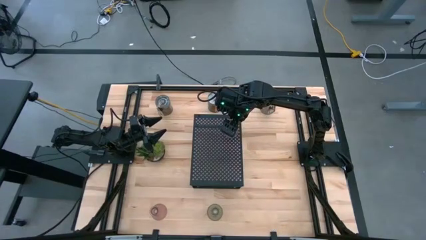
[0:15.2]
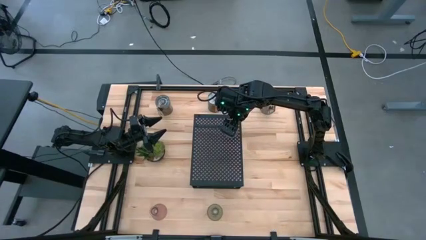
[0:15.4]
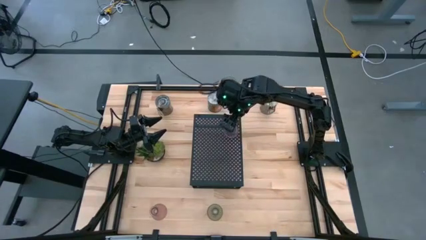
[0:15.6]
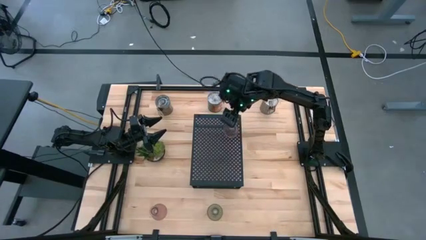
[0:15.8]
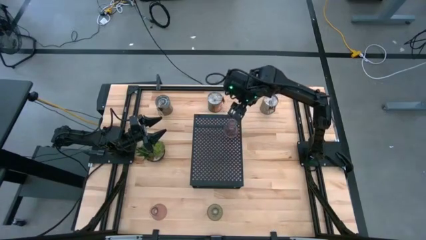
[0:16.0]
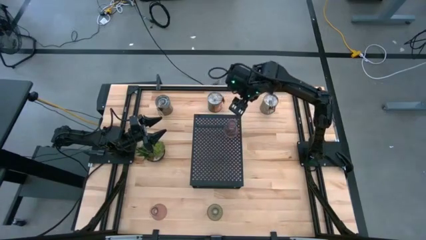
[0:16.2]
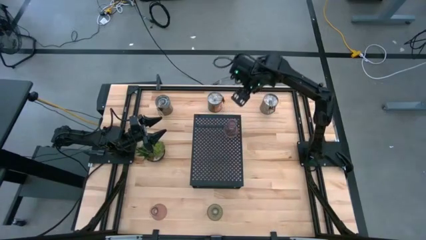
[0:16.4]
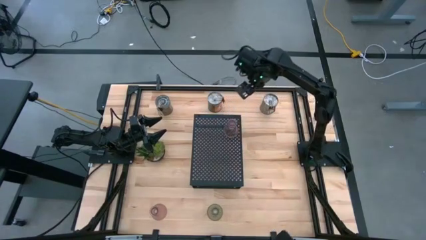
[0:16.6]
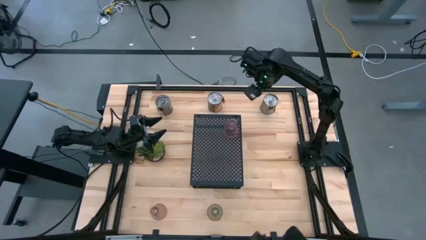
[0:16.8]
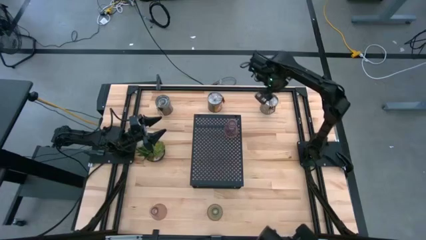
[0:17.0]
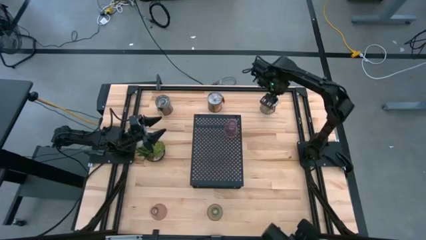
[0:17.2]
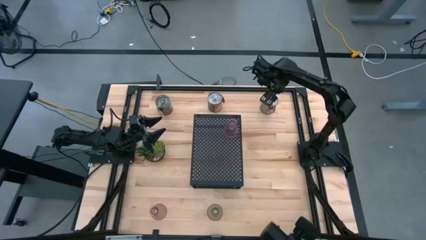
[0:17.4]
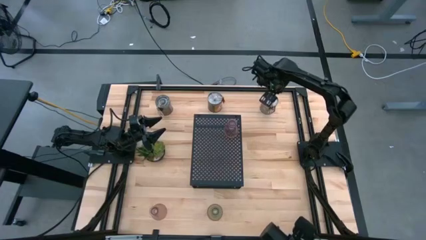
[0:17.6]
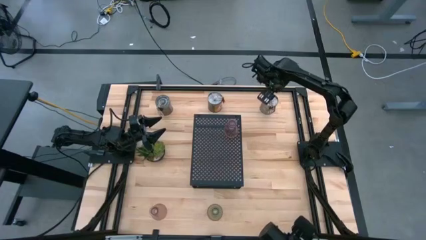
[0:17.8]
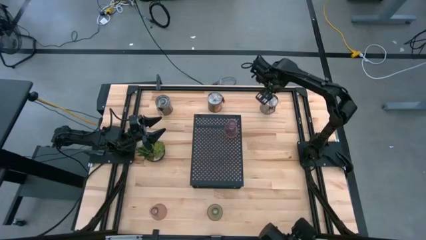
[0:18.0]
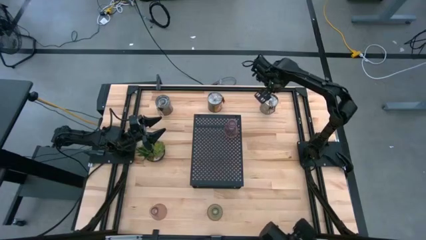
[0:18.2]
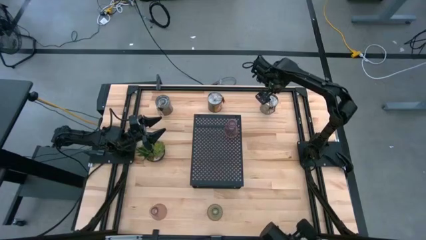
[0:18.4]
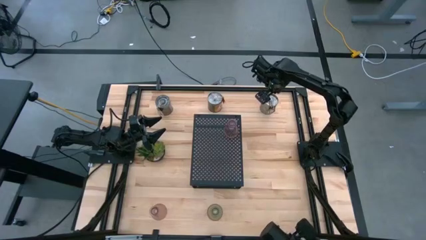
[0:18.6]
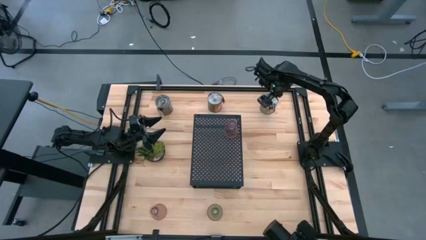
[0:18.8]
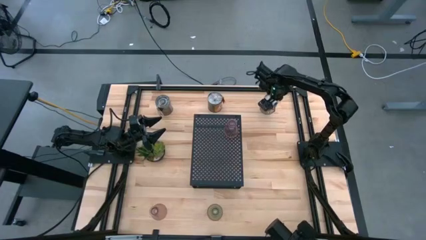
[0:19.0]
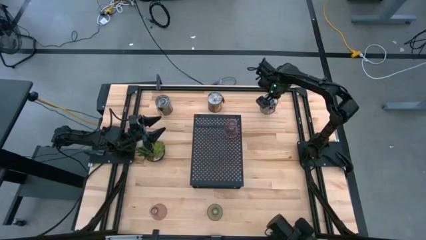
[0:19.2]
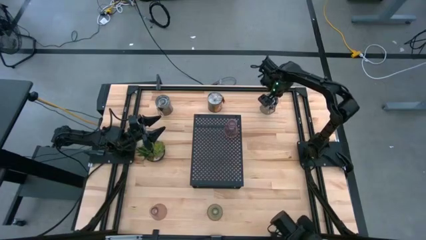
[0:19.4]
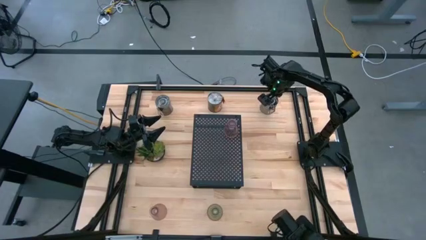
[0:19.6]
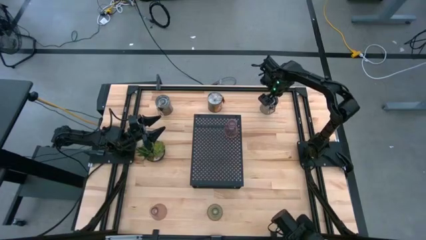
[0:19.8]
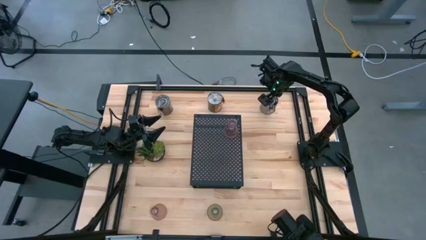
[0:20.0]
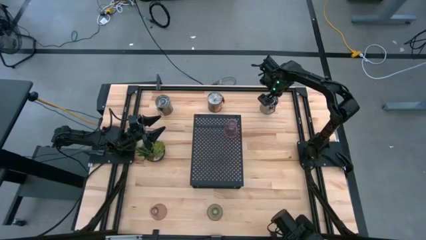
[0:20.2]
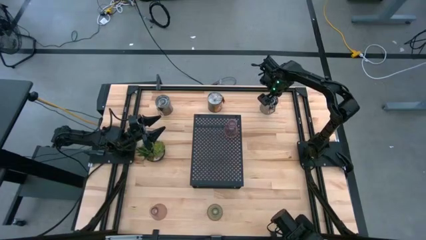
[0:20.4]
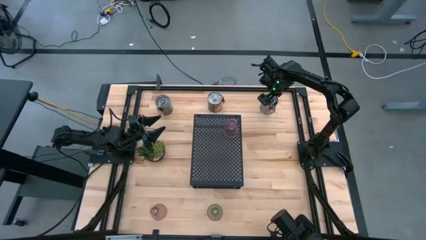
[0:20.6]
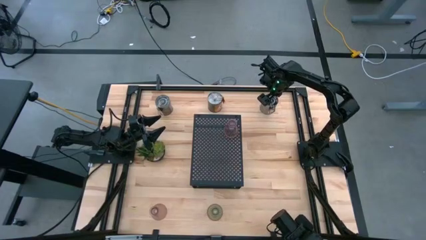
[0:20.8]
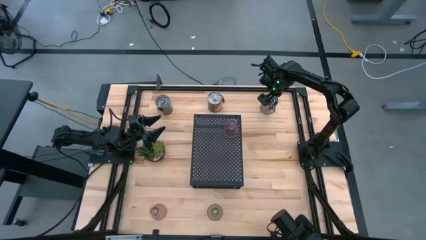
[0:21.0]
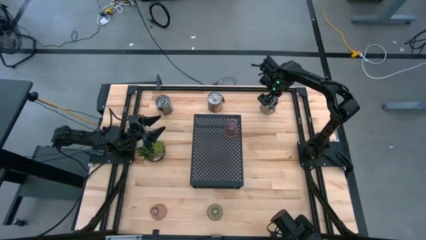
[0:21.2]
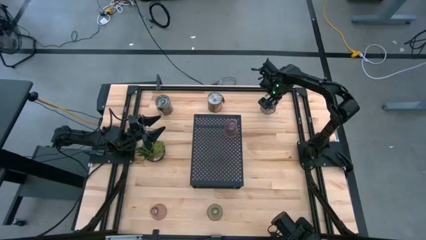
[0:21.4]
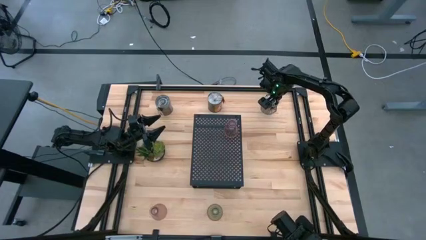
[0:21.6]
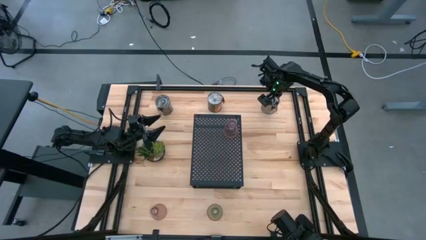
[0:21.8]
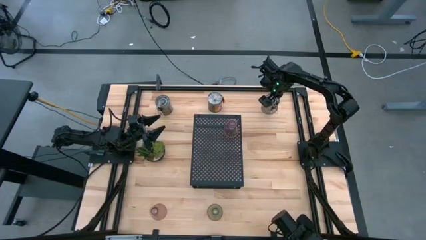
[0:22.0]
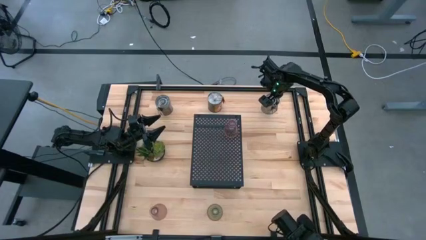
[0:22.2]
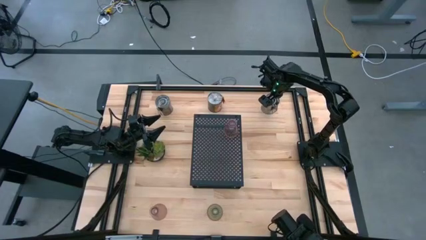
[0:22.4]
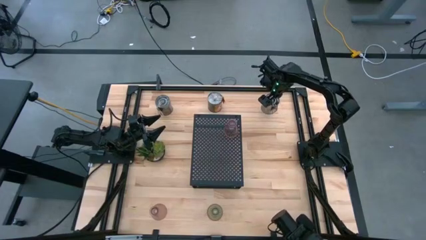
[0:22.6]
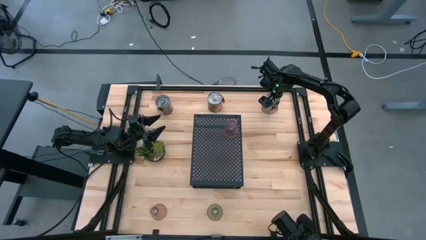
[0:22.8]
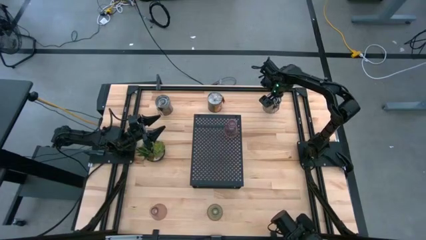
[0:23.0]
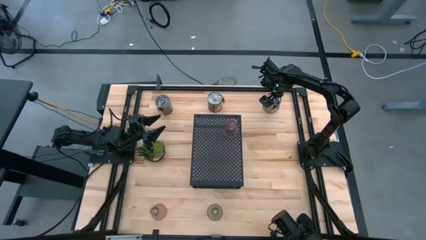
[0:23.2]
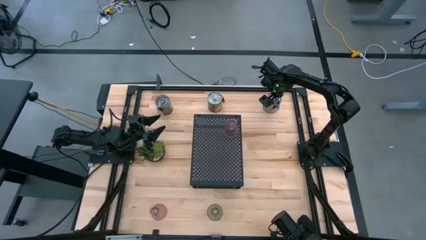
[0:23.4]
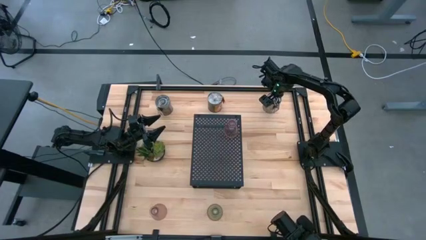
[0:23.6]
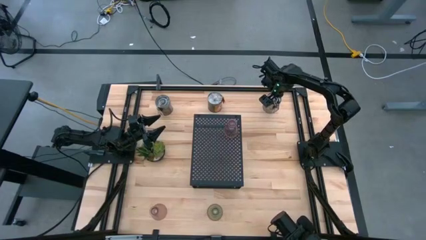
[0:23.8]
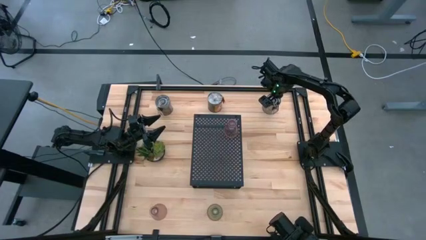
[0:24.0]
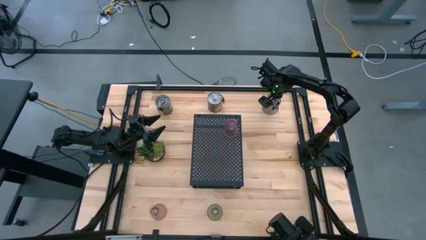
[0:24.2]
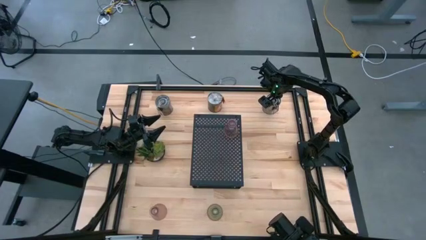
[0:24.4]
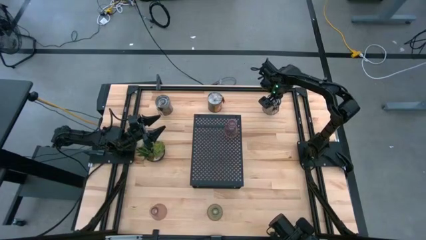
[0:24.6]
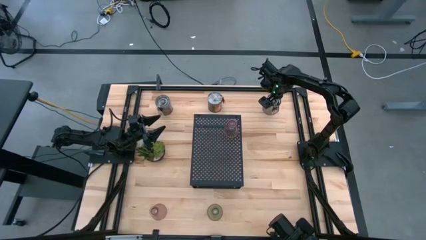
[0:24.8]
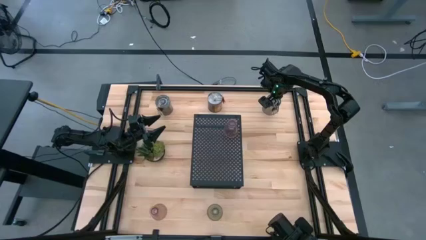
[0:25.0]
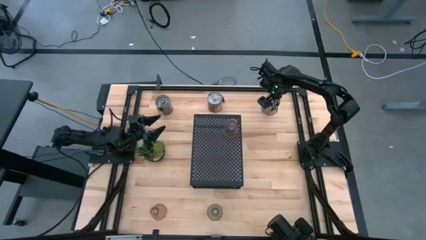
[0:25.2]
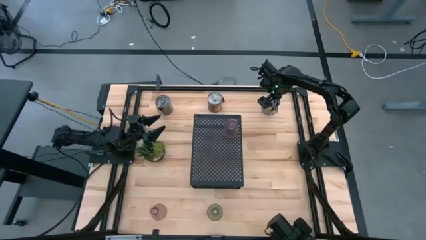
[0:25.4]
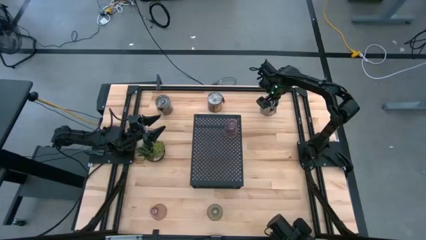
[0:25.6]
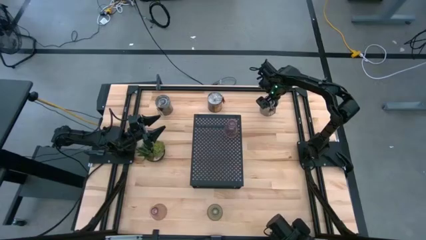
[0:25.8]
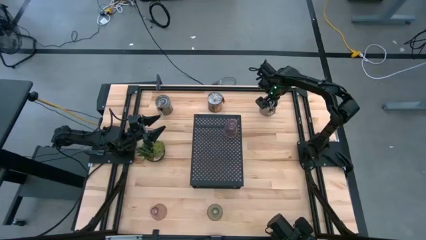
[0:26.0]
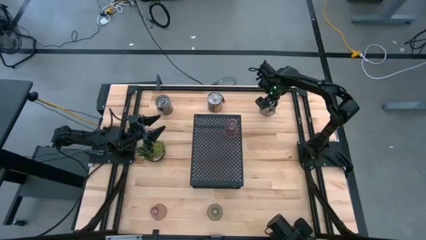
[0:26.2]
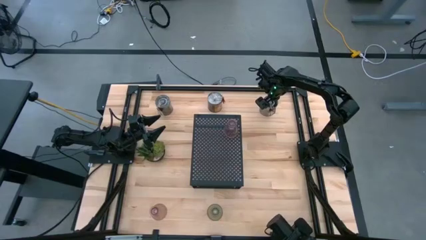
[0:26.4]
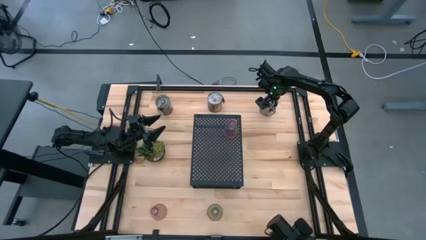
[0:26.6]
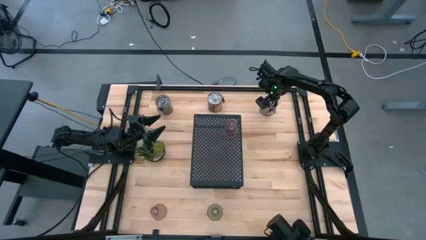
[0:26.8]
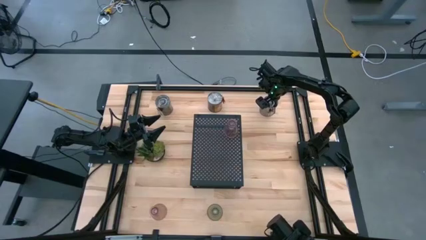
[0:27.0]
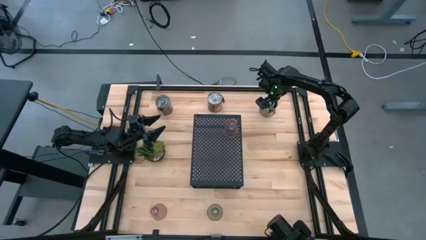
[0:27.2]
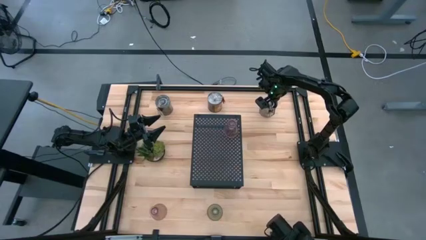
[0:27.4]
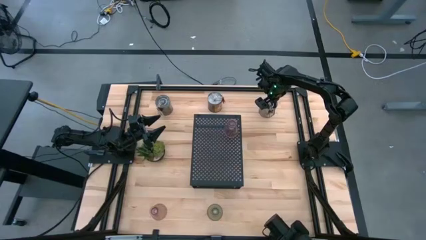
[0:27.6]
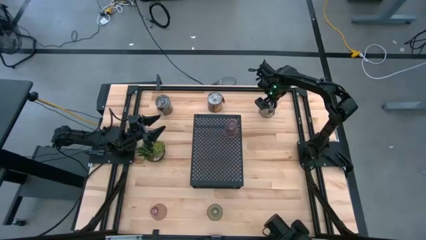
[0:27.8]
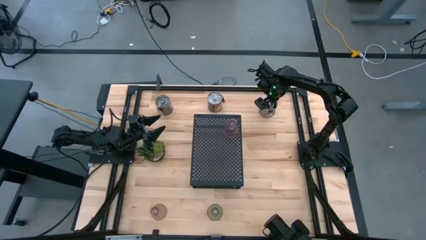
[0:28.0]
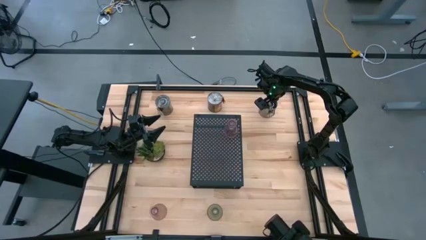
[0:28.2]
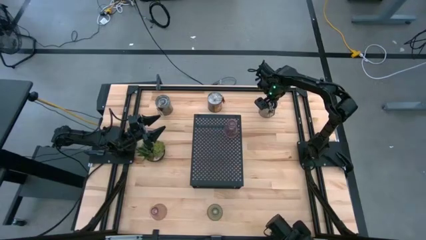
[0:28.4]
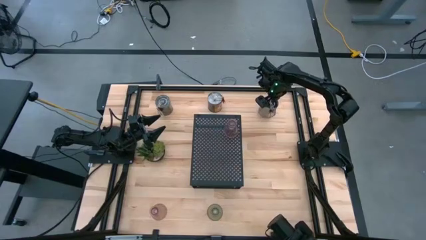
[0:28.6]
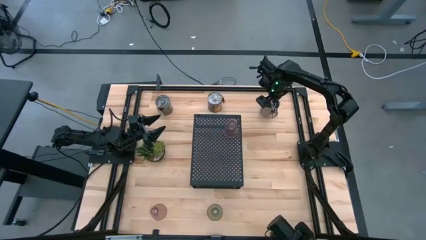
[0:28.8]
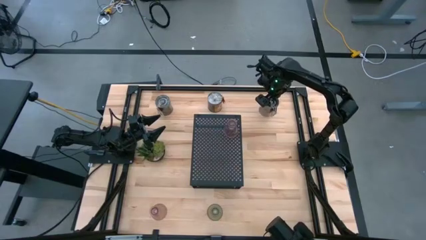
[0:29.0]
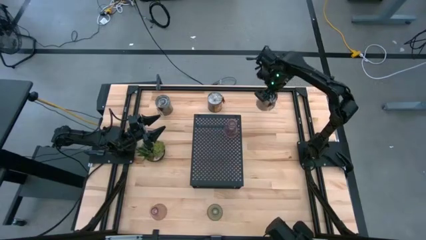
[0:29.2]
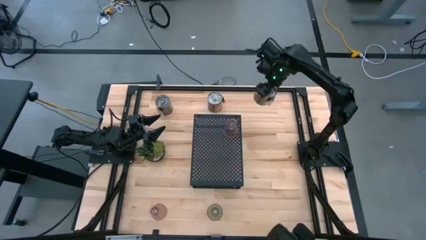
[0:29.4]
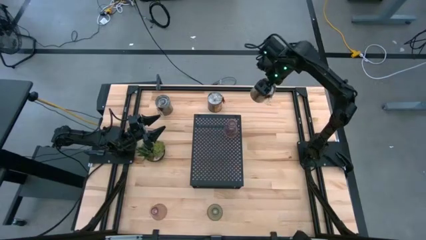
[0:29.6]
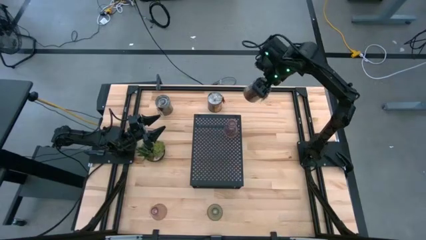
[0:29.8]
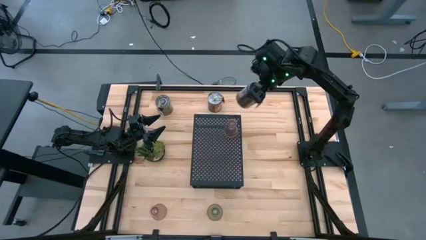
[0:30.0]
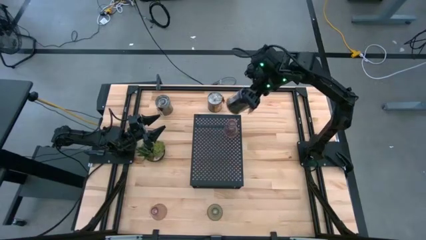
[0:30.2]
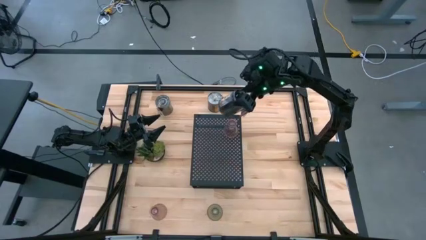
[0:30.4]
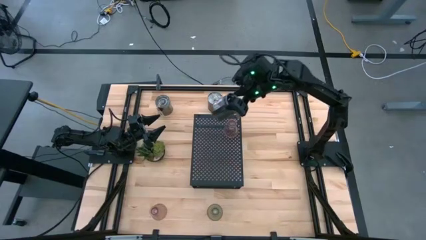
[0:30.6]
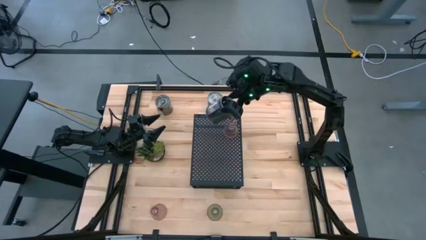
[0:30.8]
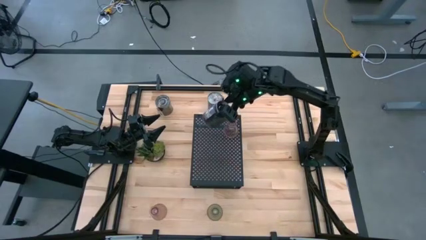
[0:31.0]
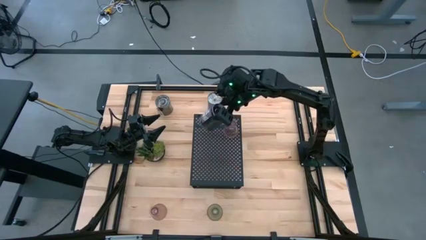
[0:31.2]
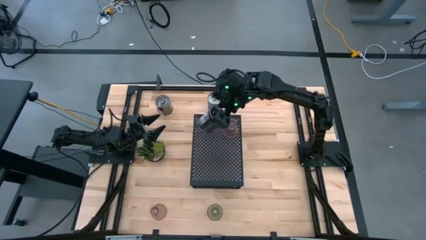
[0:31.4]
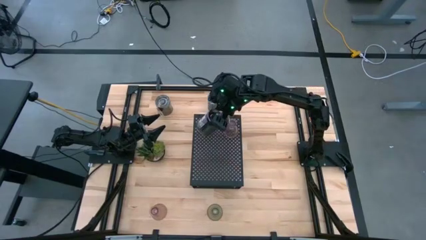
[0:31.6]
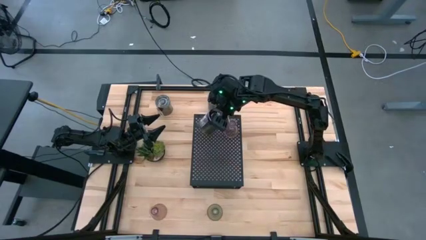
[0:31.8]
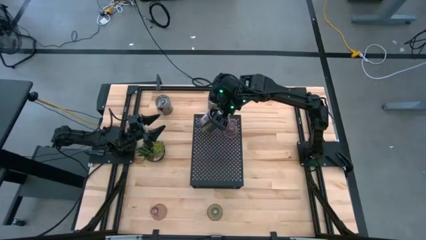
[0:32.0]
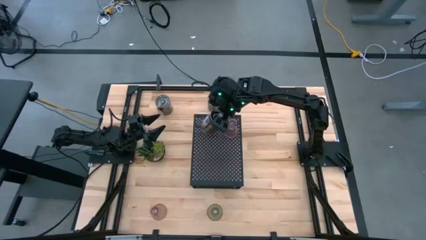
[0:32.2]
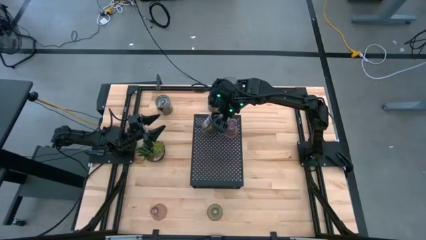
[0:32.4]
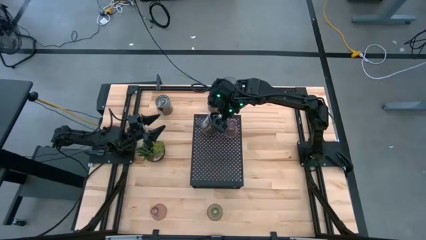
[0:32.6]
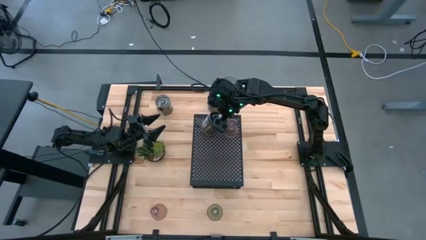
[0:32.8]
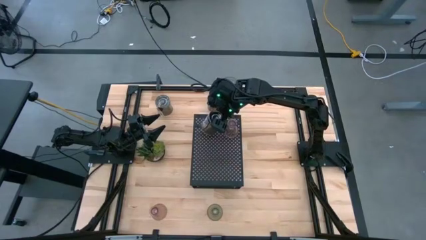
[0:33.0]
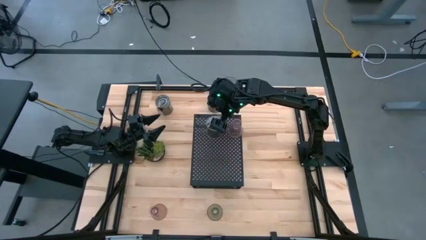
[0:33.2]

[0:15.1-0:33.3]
Task: Pick & Place candle stick holders
Put the right silver scented candle on the shelf
